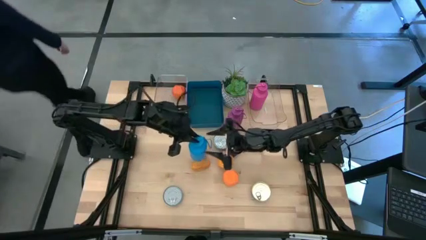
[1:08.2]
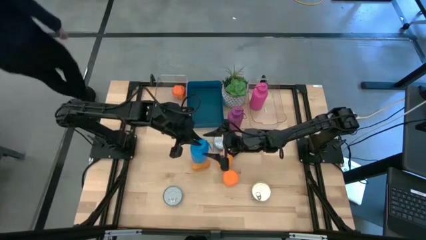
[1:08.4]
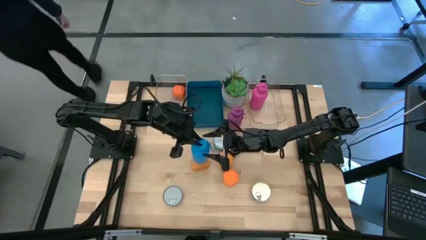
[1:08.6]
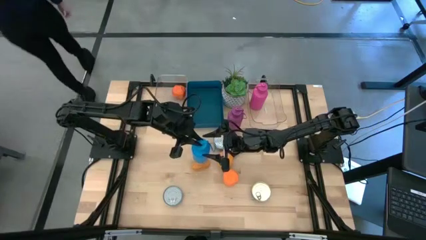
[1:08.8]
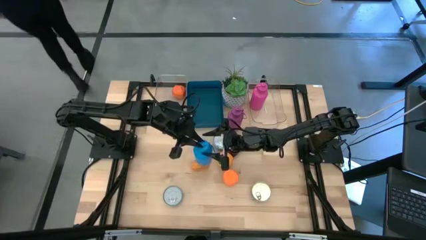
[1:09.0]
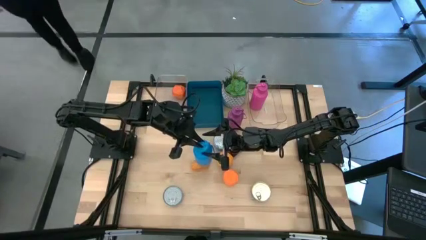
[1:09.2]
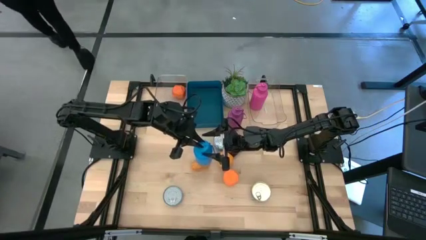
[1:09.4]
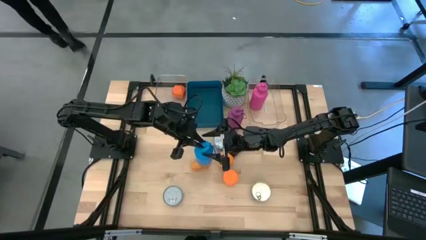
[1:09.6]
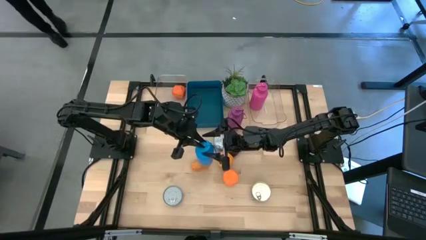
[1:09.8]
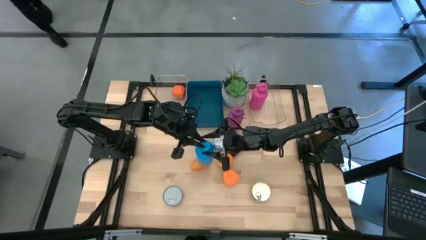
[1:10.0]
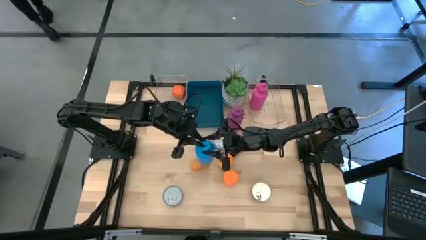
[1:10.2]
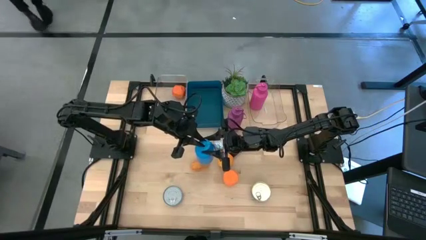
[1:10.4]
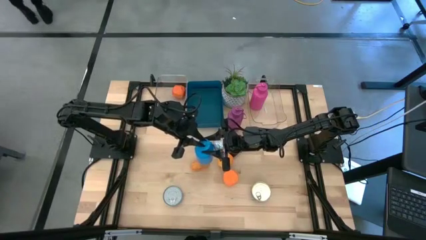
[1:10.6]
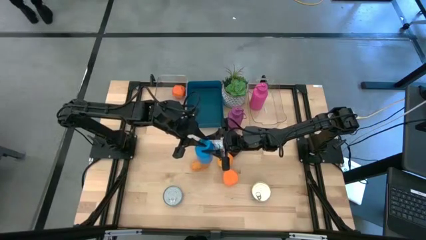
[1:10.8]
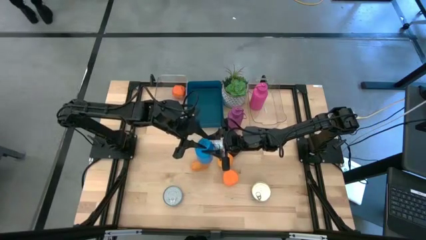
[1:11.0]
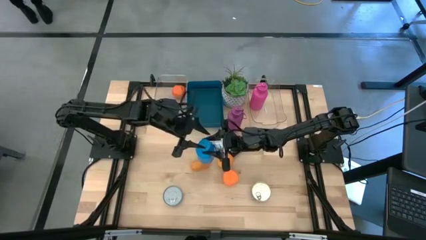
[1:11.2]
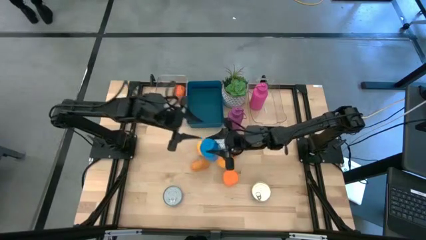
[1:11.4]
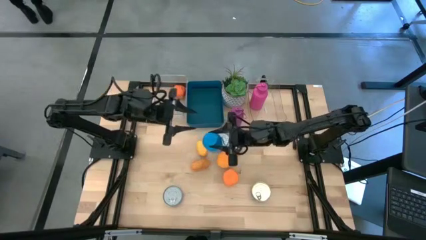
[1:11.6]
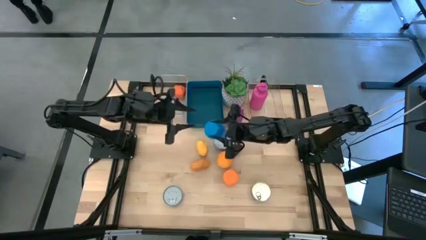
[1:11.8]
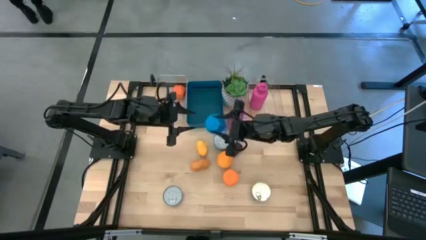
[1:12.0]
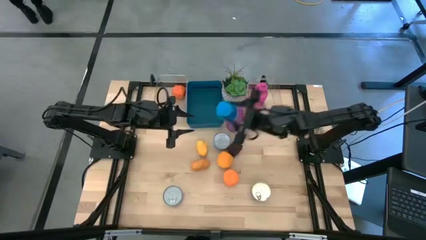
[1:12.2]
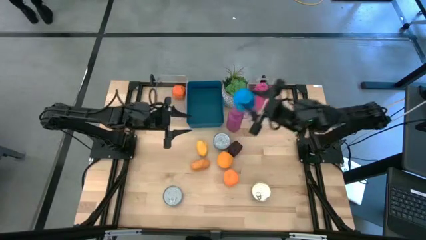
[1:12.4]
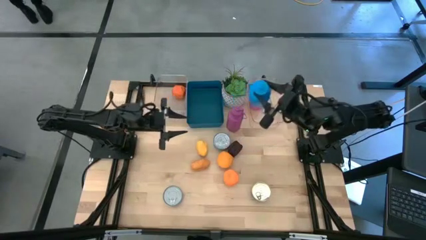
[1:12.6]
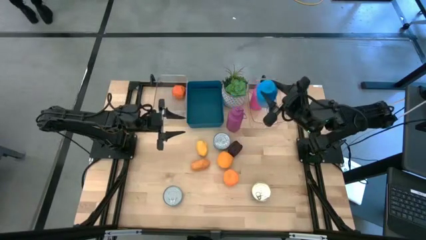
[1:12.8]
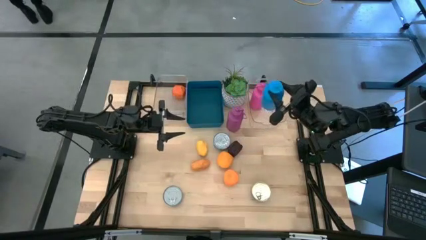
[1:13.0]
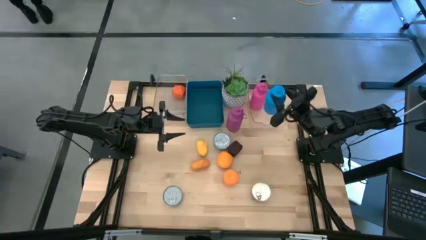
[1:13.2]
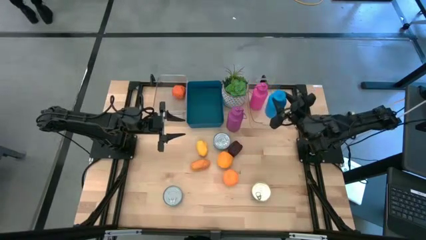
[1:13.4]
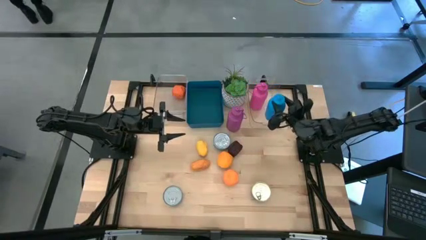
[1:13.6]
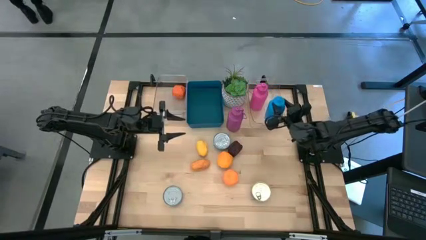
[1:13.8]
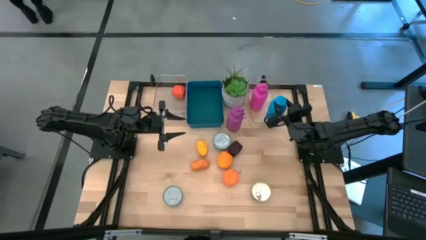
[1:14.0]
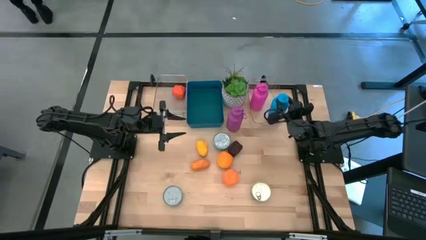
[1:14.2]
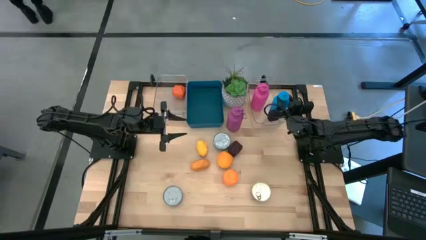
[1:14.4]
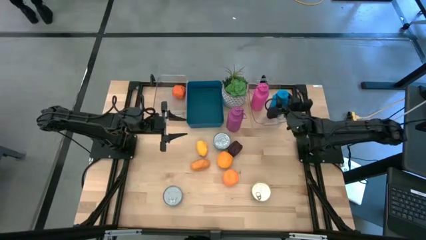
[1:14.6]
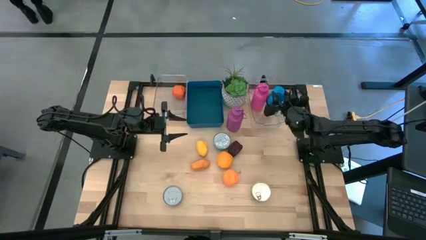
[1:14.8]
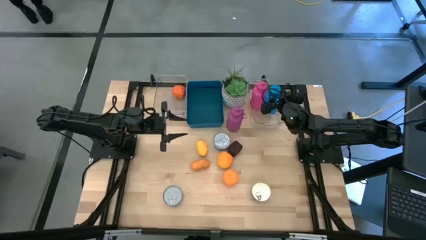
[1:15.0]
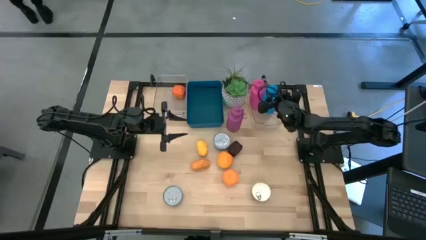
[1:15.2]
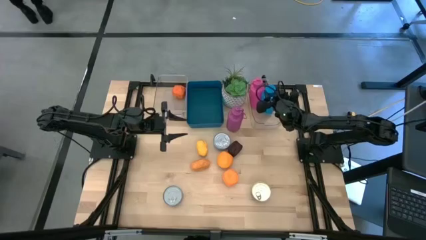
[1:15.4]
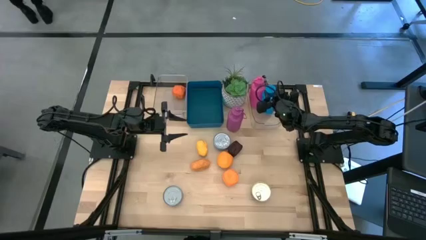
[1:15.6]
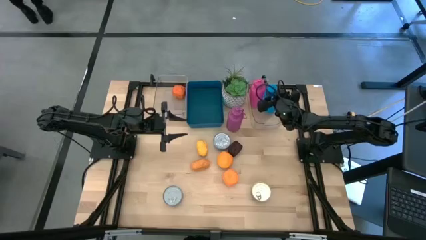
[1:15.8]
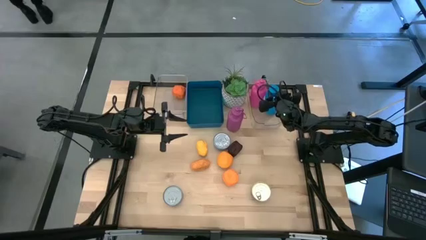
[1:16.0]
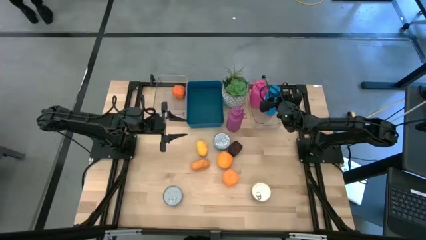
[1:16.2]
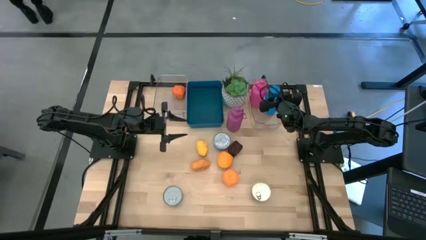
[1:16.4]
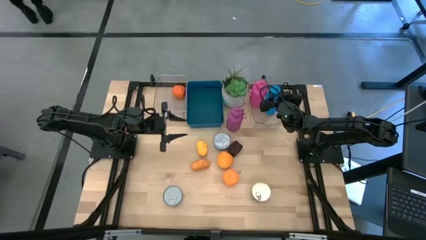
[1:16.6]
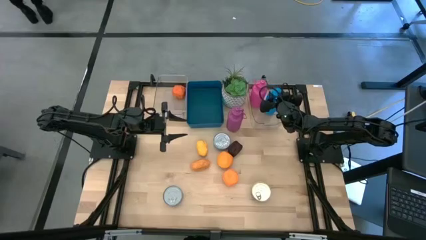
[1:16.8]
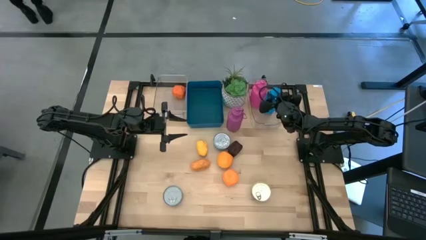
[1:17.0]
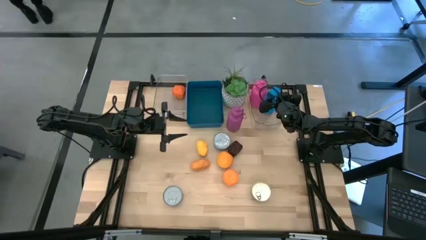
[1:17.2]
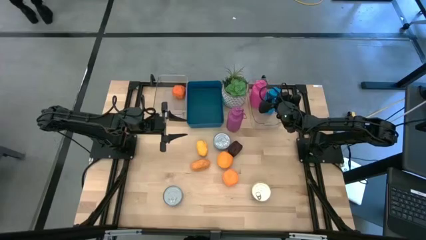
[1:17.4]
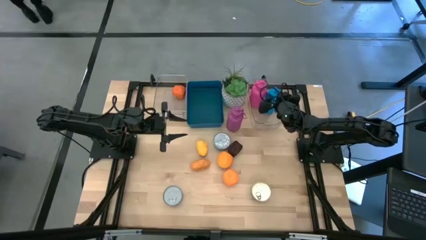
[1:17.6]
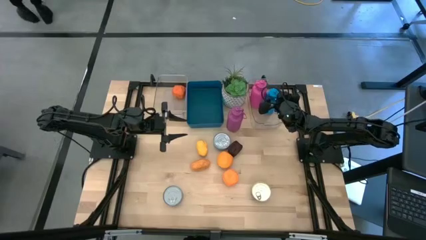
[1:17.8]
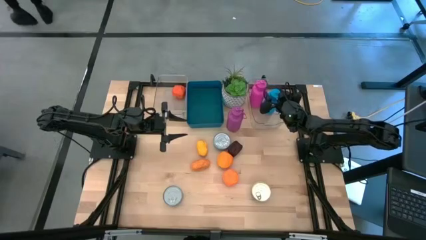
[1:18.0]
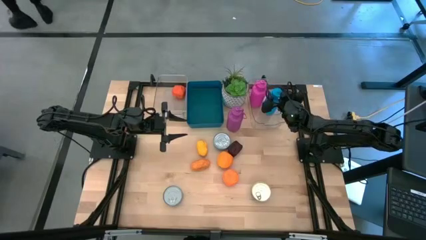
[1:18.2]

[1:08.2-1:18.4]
Task: Pick & Place Food Item
Put the blue tumbler into the right transparent bin

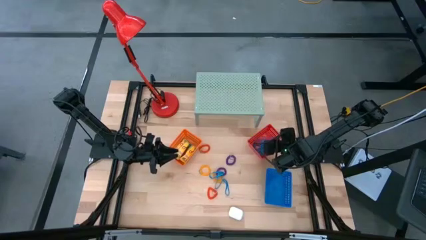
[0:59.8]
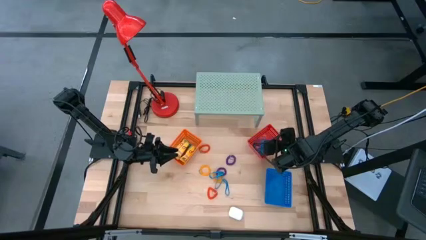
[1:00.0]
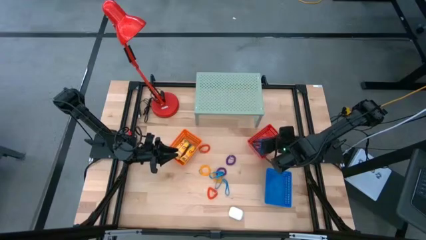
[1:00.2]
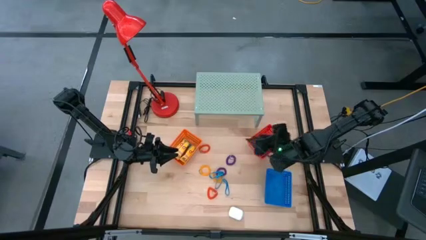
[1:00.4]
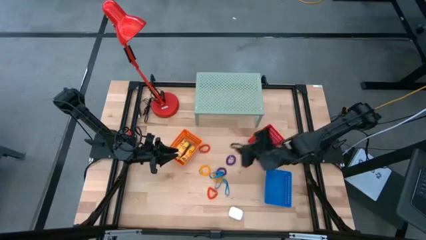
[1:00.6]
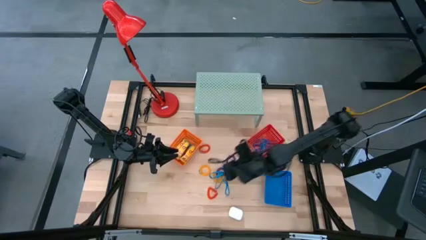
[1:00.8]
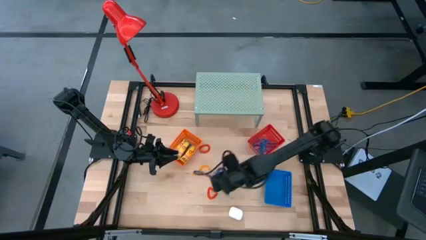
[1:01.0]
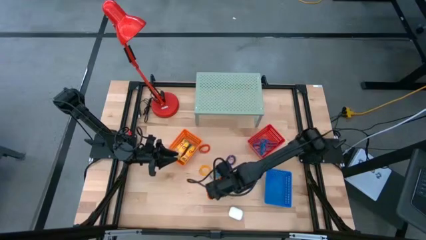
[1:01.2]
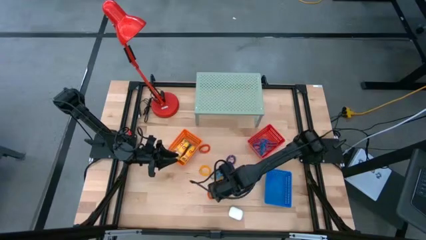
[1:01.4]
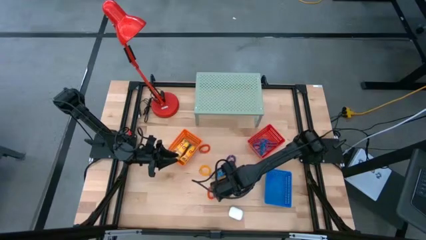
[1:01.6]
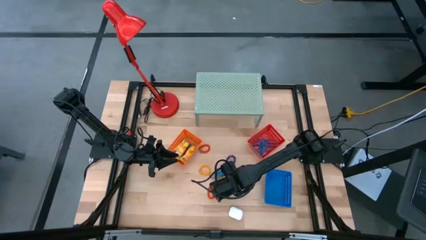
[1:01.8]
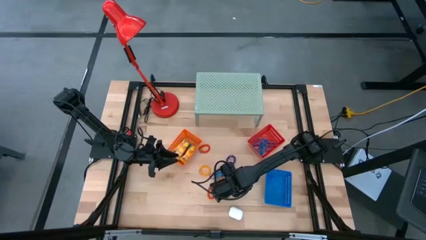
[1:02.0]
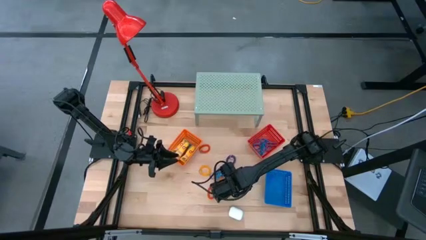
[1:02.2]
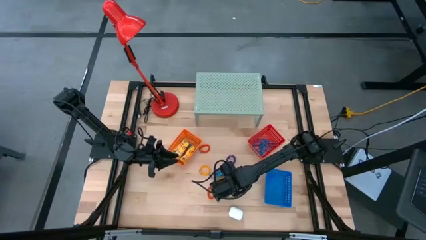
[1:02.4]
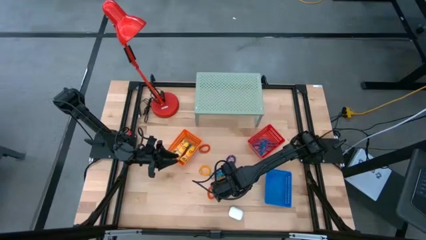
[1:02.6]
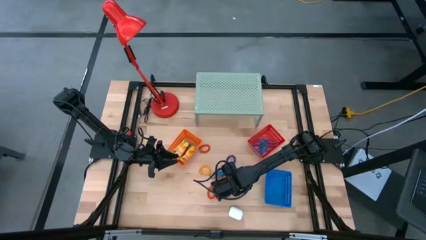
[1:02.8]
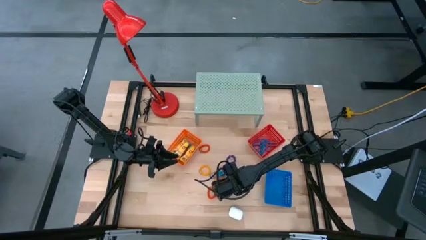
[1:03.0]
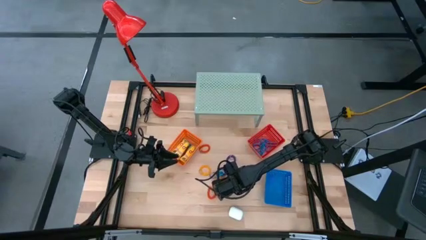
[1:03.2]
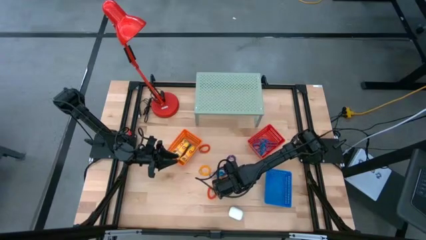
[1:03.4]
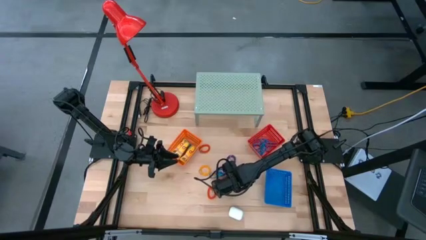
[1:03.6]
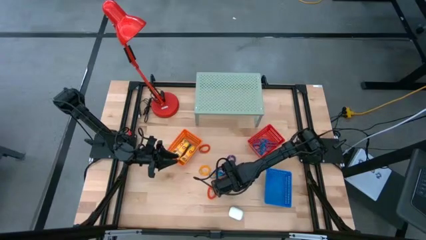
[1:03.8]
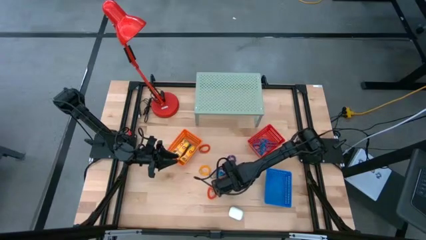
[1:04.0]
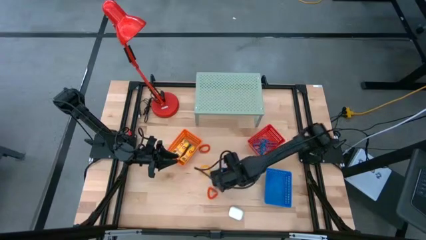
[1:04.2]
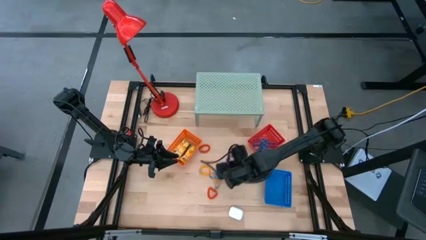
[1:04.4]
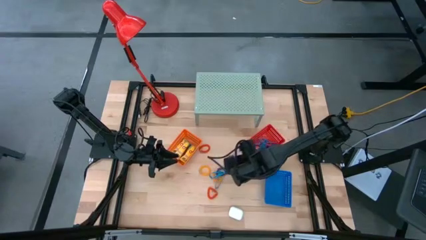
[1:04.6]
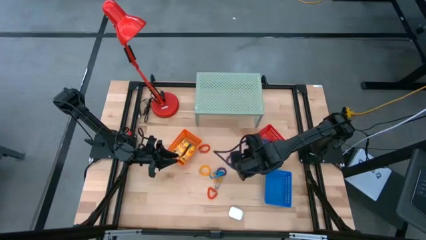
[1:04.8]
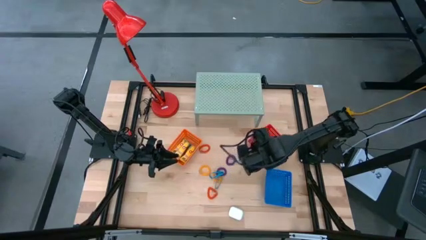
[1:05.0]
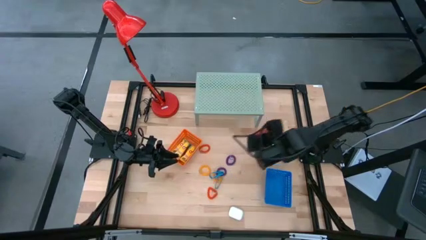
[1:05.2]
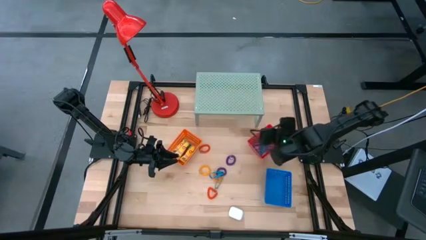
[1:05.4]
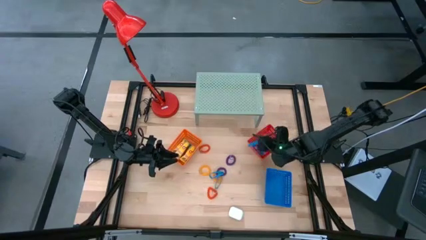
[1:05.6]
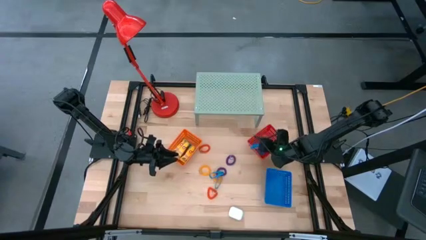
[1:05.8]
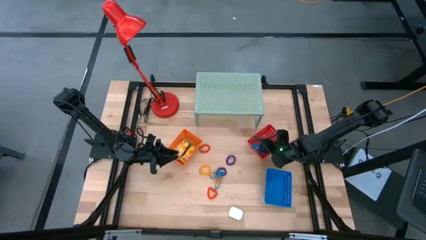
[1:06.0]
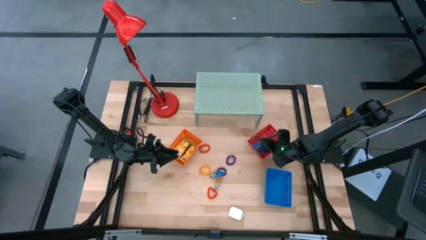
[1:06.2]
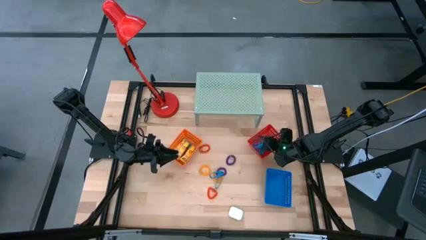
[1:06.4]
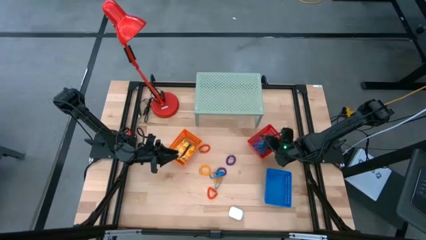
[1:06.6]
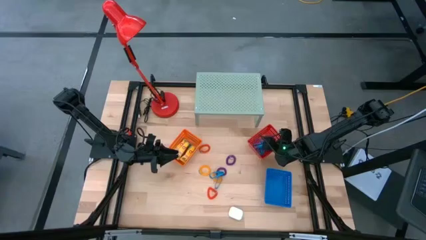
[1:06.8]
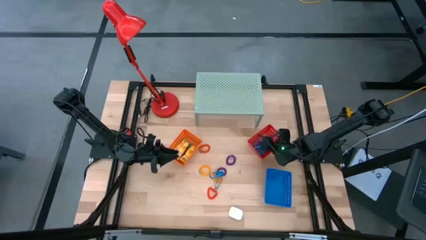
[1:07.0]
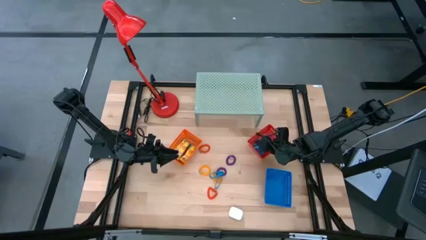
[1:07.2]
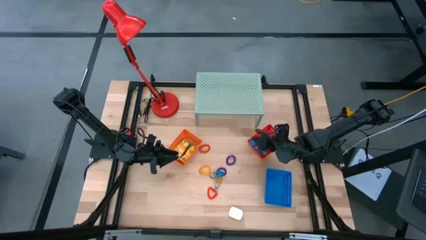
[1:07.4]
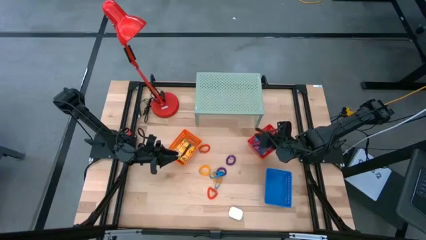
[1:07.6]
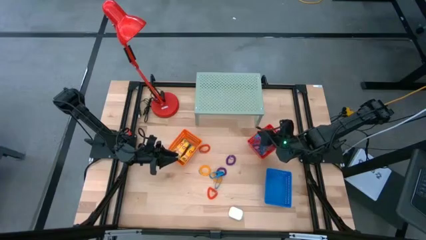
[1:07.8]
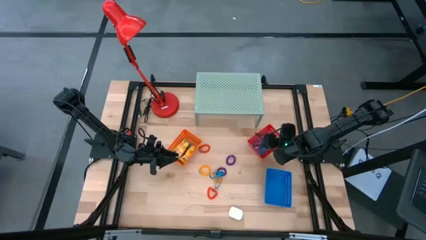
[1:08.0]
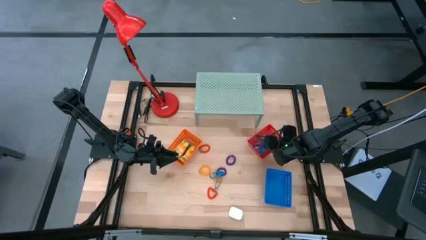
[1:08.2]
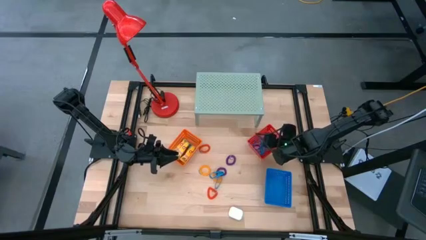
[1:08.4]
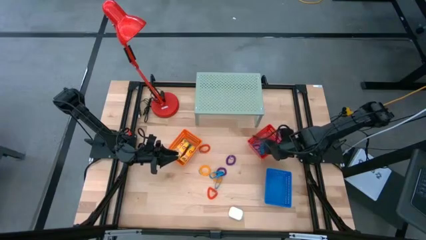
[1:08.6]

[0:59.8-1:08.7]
Task: Pick & Place Office Desk Supplies
Put the blue rubber band into the red bin
